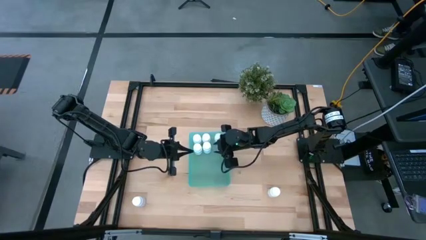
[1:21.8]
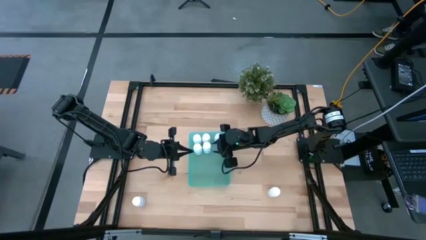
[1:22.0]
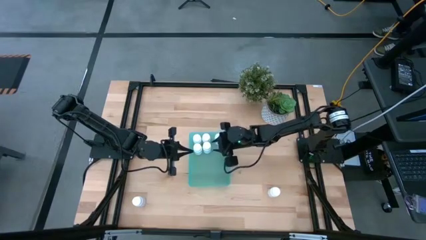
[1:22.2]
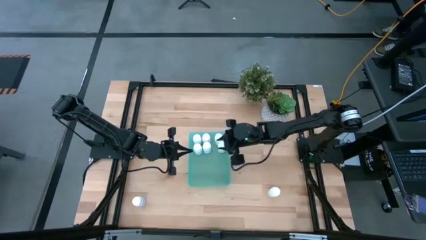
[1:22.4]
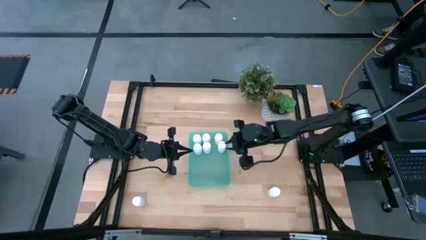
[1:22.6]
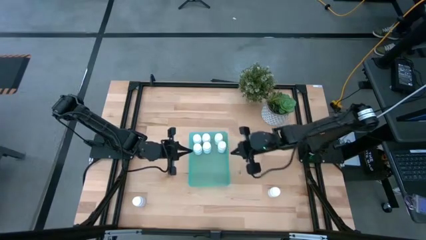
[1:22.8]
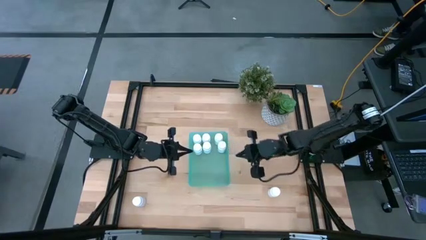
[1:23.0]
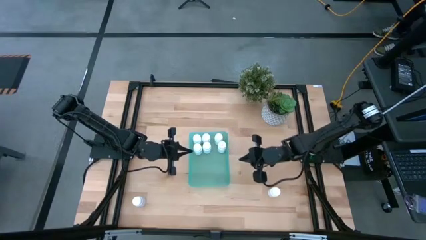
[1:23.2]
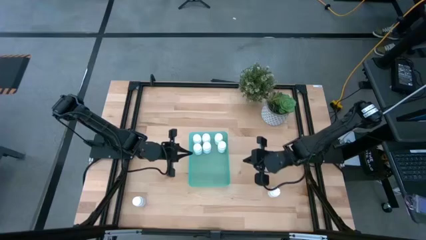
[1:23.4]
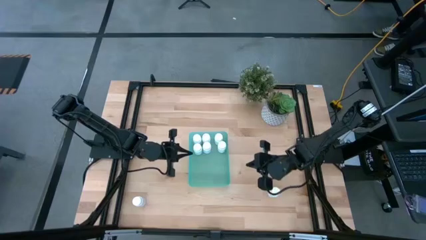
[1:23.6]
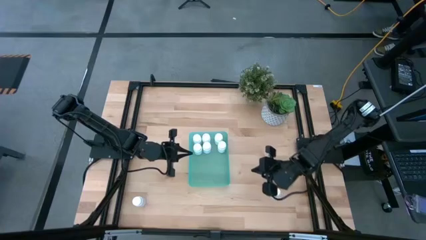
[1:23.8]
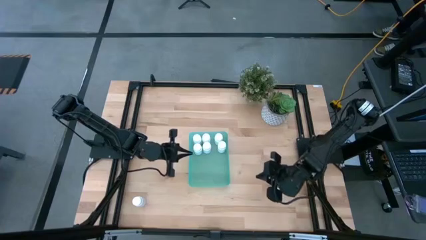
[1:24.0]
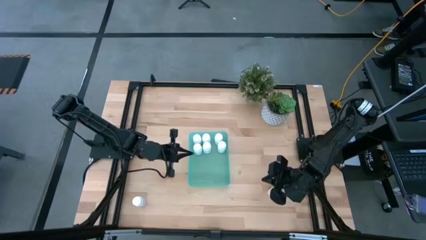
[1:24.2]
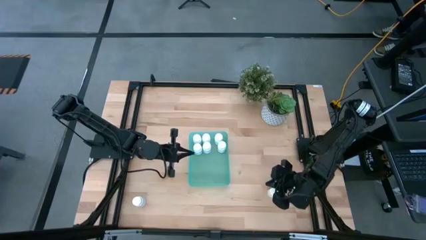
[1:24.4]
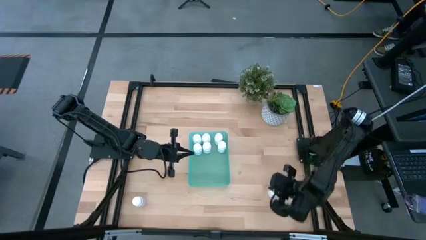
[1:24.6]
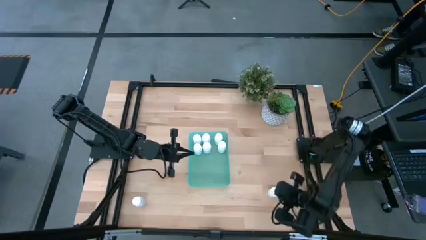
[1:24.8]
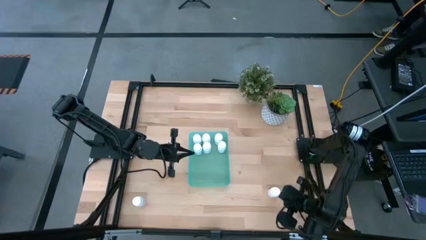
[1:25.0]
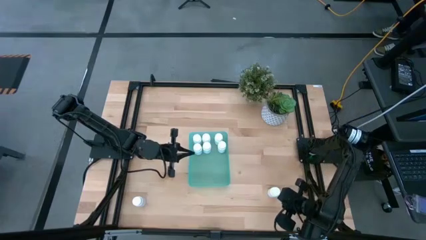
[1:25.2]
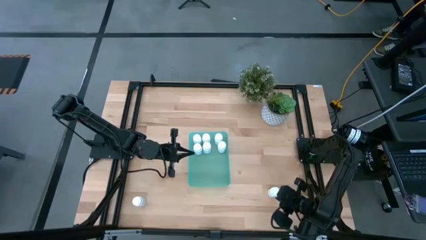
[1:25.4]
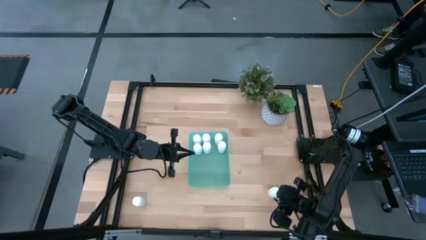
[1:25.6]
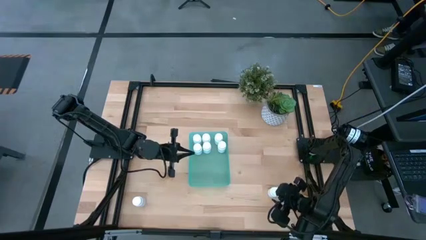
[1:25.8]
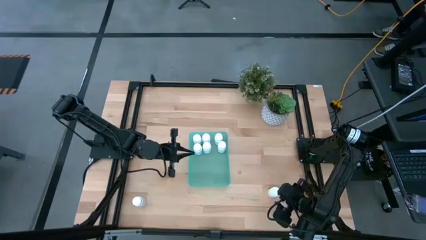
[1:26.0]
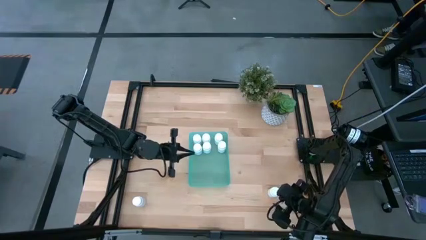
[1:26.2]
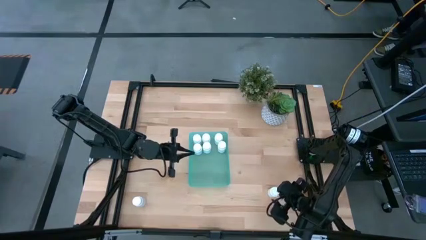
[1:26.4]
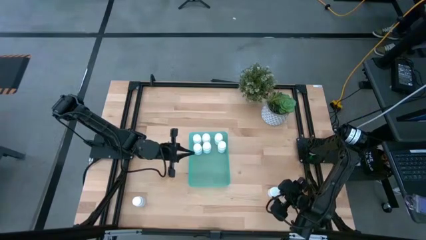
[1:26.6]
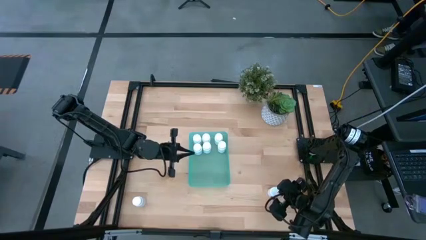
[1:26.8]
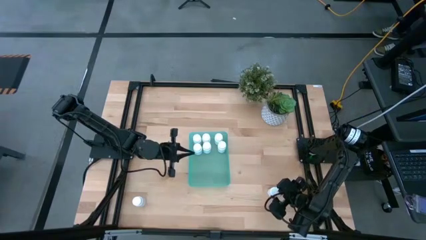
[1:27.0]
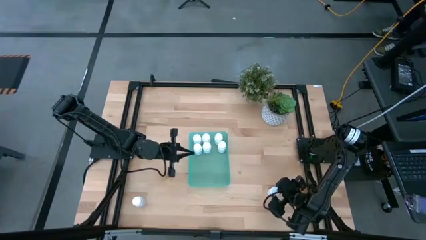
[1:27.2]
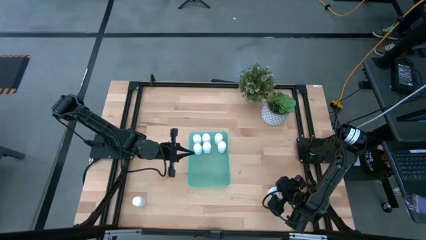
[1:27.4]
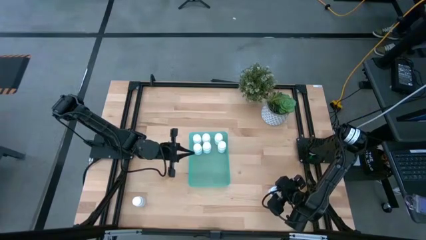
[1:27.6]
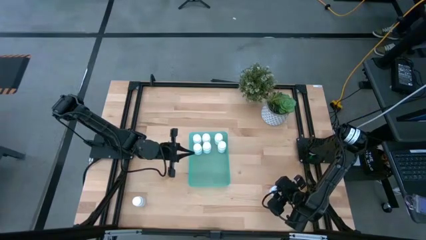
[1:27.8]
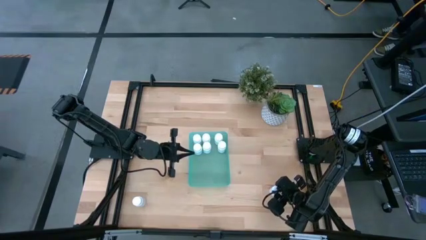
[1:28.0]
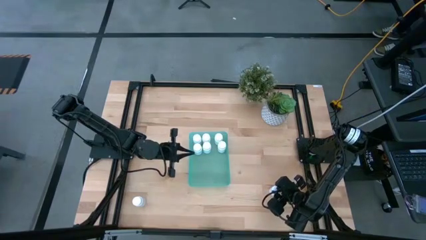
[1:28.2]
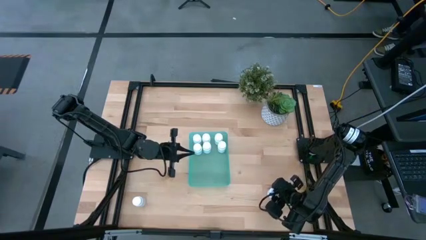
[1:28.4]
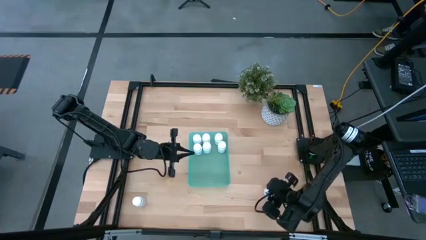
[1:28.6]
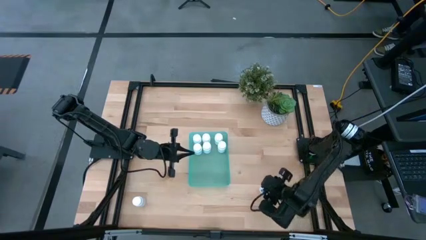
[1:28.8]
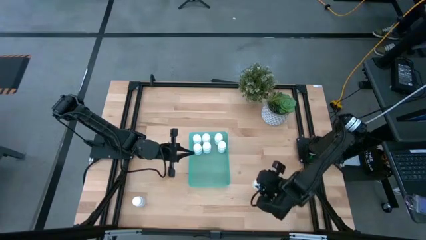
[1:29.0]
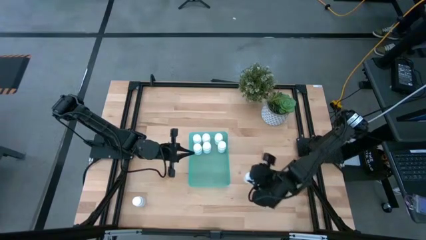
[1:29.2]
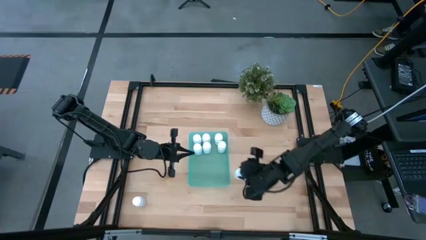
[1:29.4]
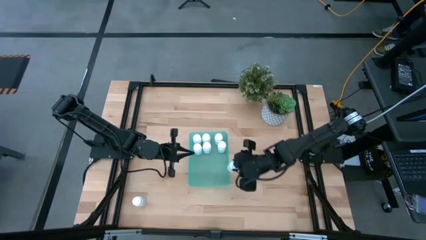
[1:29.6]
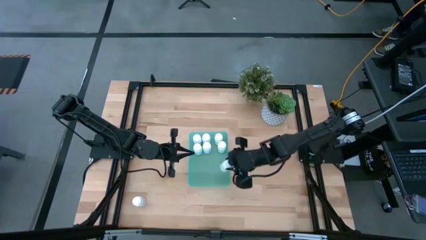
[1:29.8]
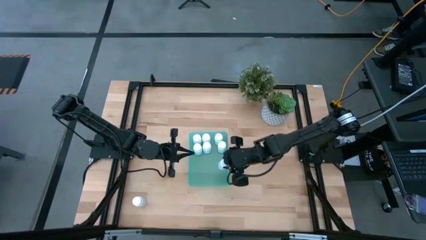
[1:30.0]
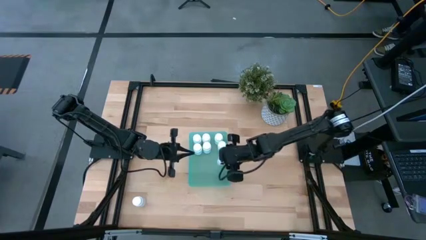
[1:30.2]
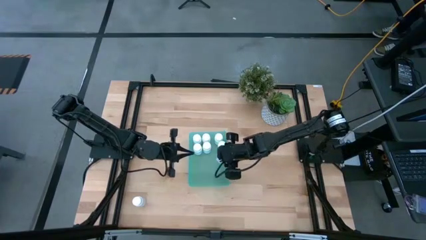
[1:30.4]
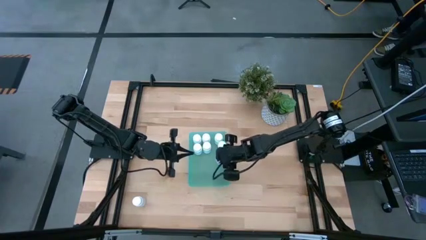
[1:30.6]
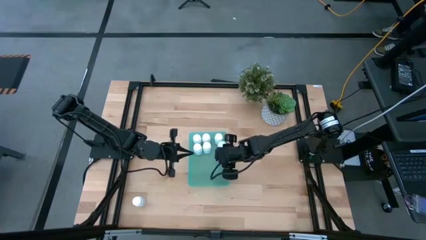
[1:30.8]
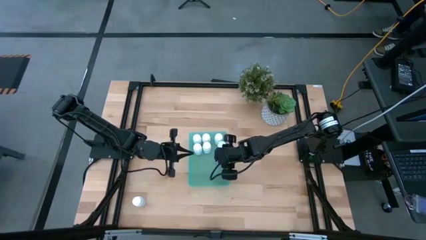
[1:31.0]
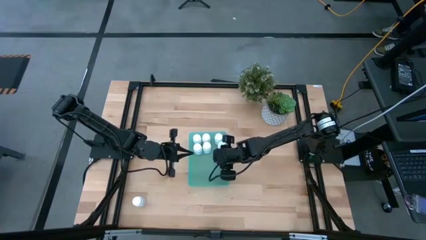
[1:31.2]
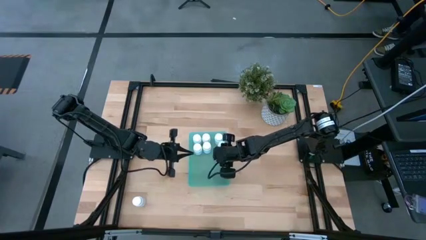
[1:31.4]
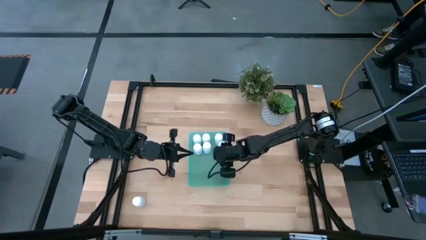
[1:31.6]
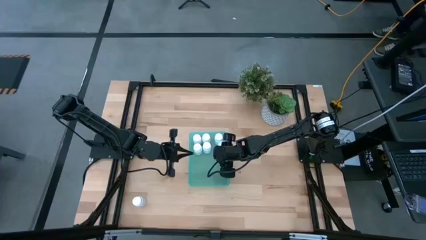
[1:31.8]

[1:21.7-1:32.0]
Task: Pick and place pill bottles into a basket
Put the white pill bottle into the green bin

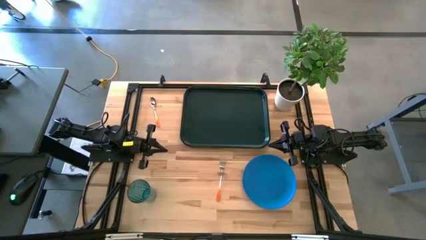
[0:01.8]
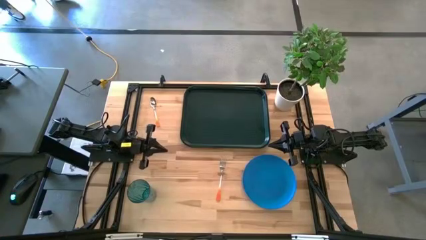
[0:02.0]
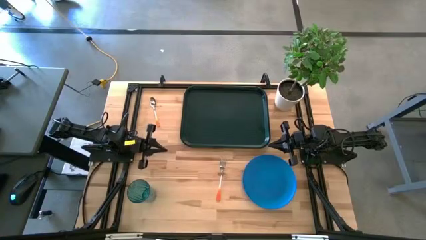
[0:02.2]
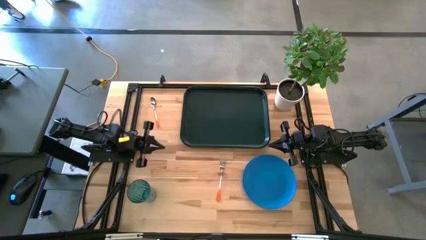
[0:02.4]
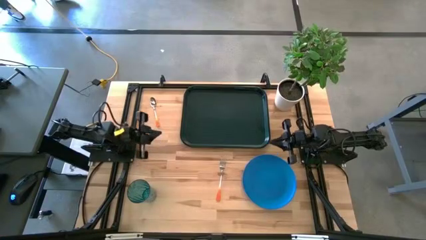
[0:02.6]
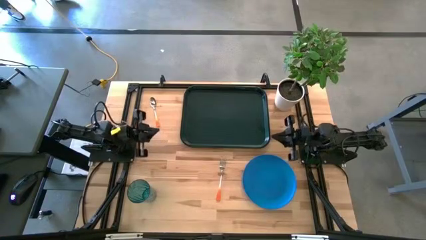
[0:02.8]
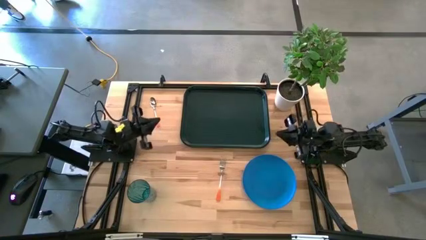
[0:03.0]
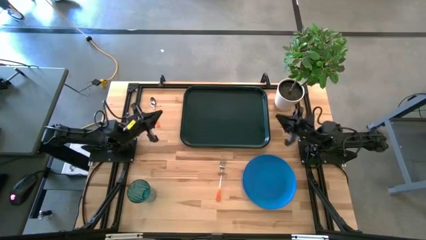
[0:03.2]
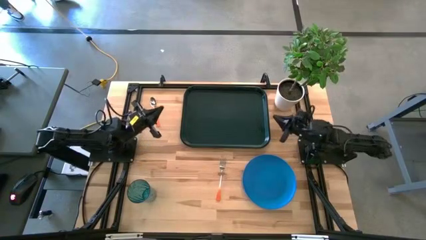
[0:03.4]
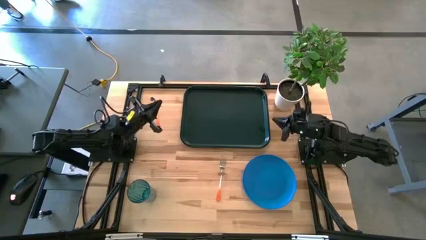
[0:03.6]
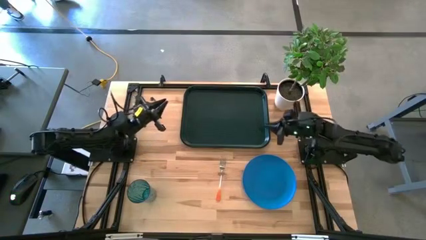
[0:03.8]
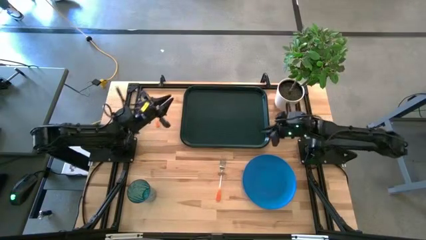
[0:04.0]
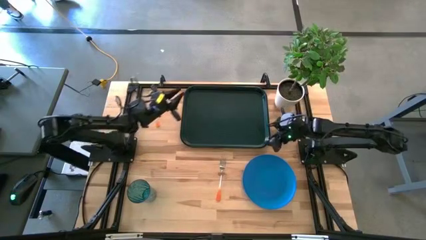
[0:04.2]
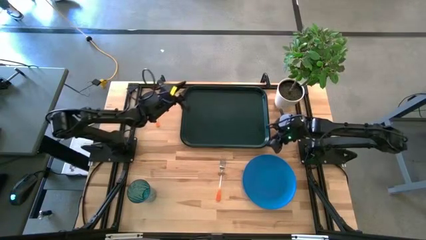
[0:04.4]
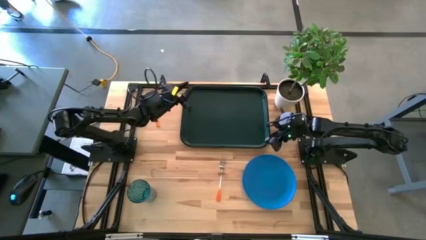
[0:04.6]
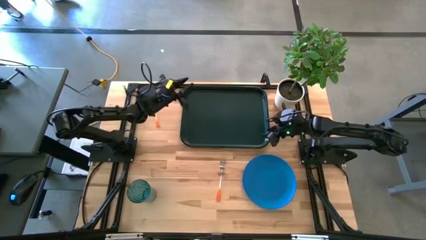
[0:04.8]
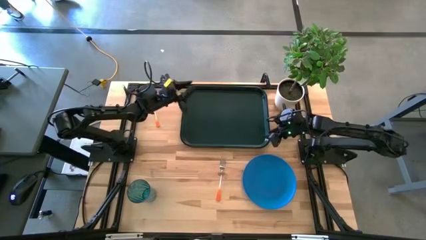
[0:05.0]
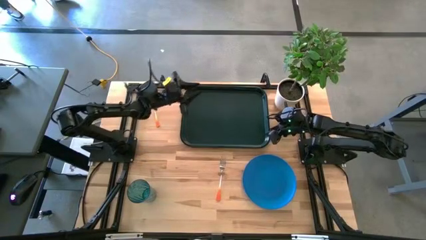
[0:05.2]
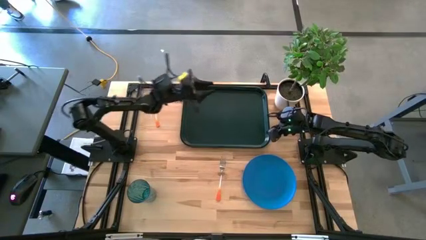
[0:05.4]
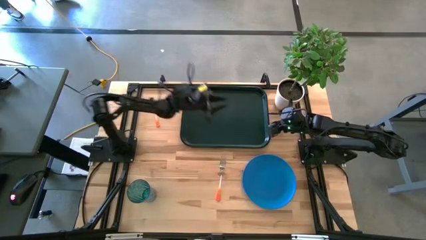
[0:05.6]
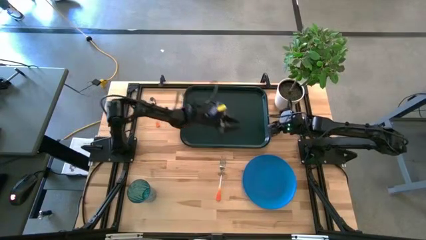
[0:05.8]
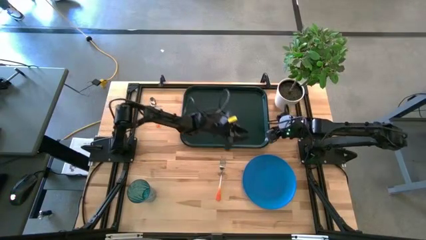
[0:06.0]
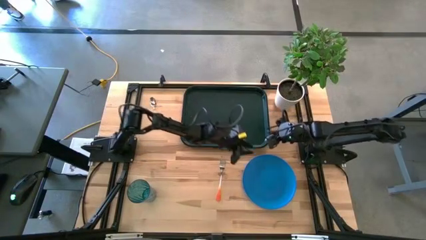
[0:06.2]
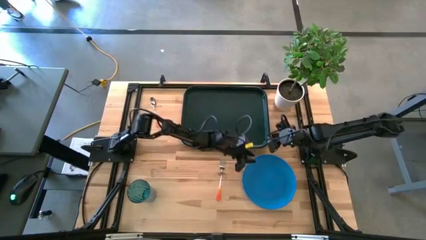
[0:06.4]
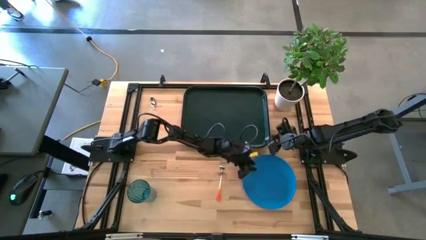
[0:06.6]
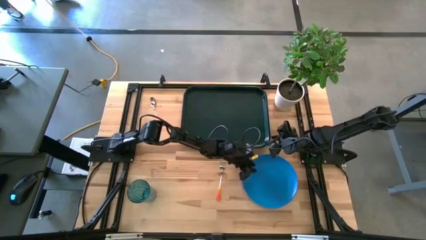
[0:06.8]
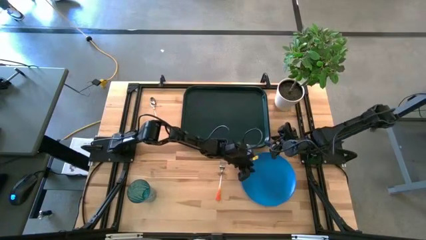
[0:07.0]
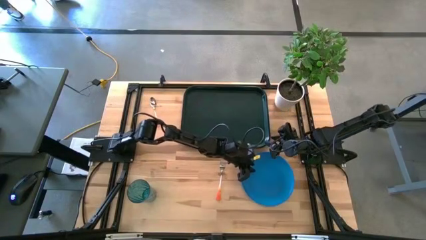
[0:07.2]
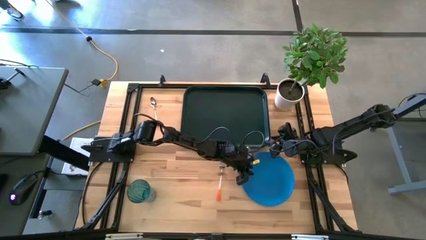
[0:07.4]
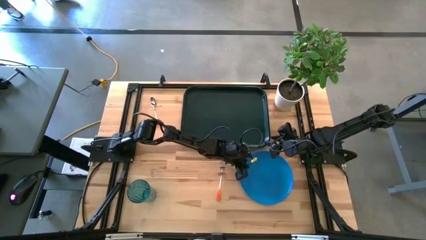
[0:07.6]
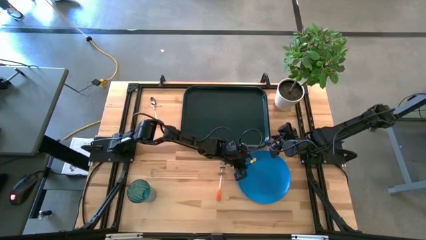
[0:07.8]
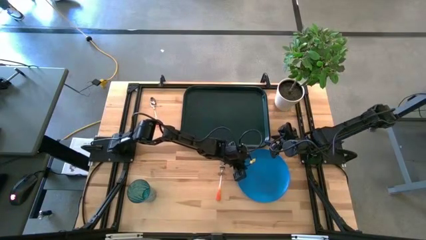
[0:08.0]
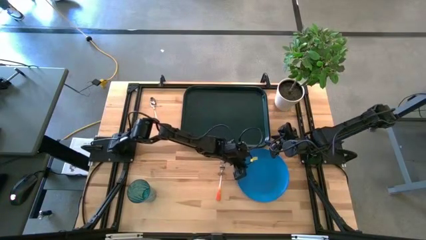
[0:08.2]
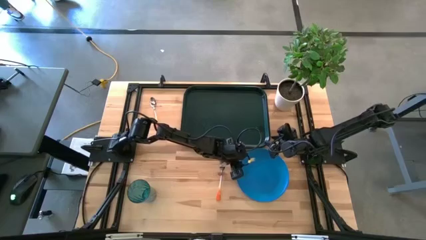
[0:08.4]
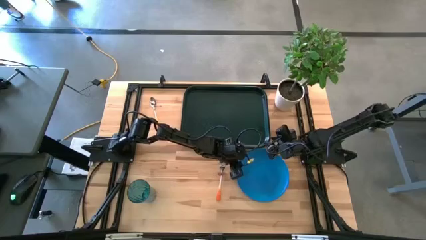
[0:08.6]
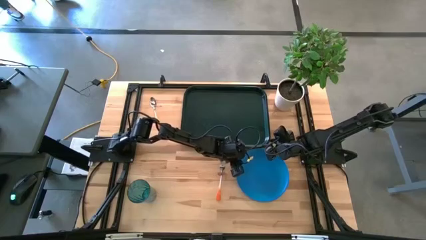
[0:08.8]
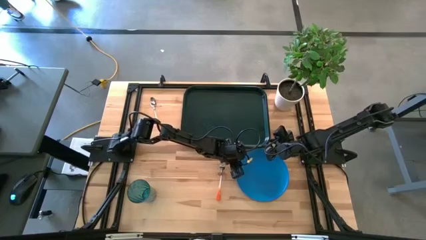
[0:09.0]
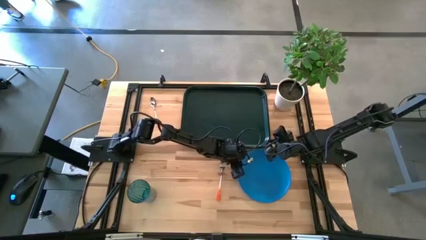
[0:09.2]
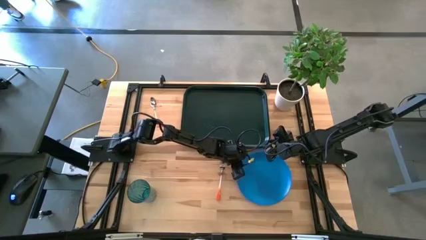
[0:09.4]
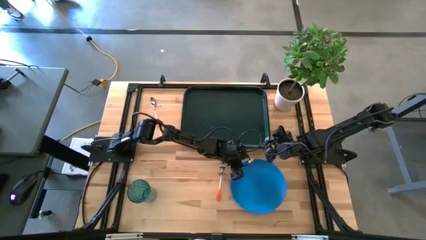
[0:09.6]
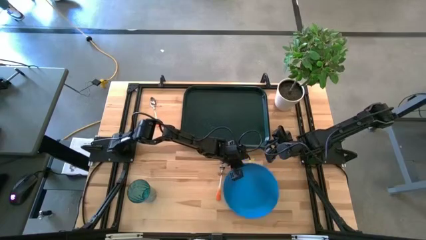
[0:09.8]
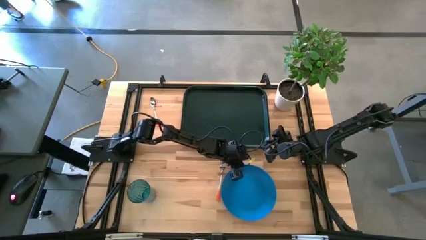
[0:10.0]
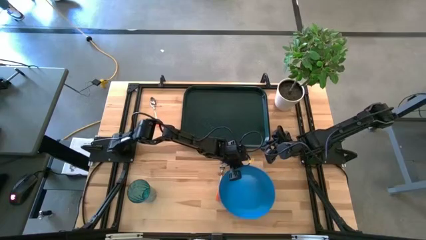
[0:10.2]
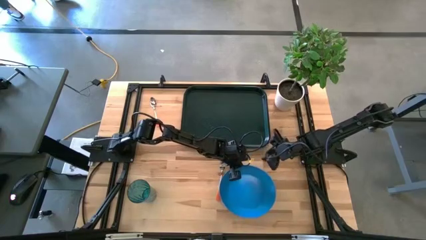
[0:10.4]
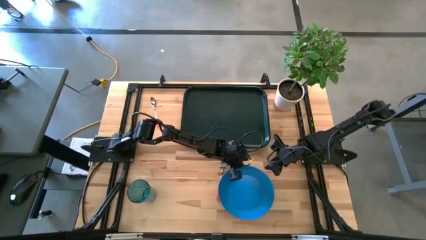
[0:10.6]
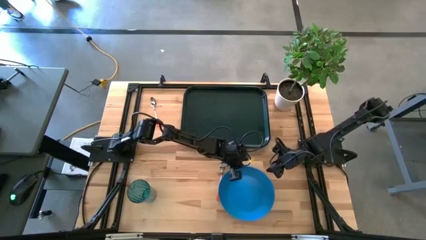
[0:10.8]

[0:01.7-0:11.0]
Task: Pick and place plate/cup/fork/spoon on tray
Put the blue plate on the center of the green tray
